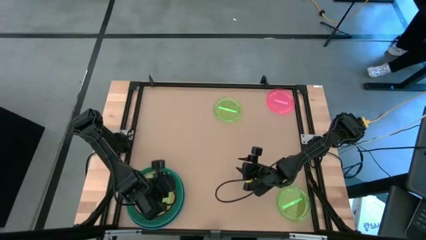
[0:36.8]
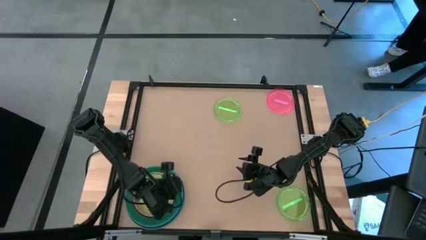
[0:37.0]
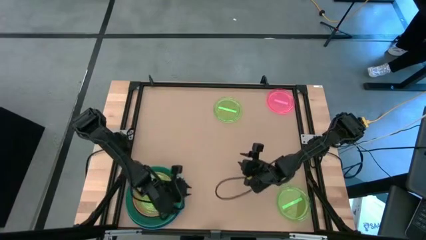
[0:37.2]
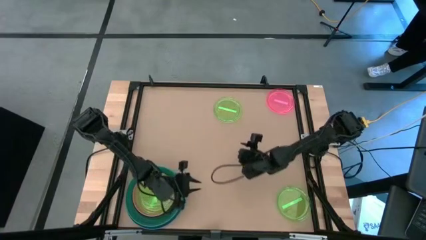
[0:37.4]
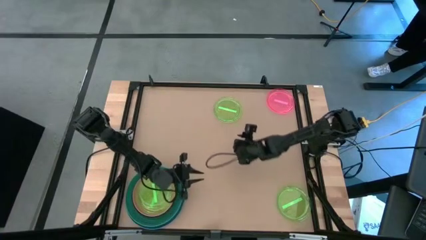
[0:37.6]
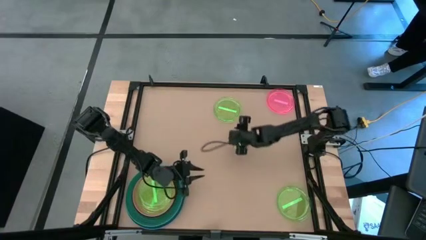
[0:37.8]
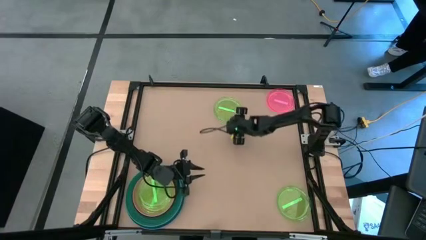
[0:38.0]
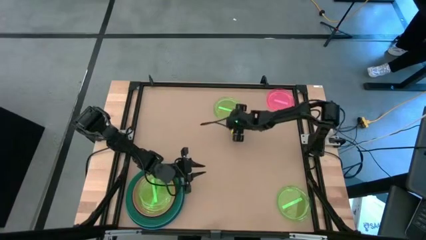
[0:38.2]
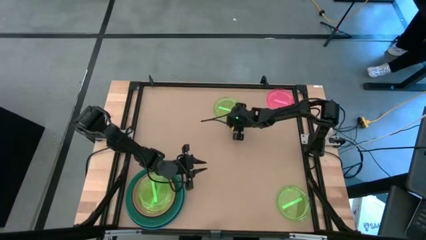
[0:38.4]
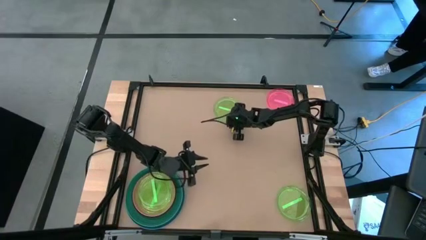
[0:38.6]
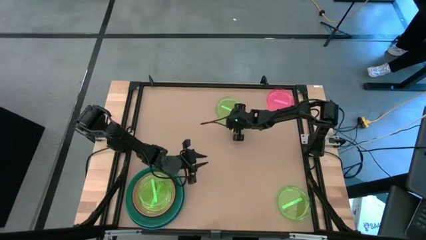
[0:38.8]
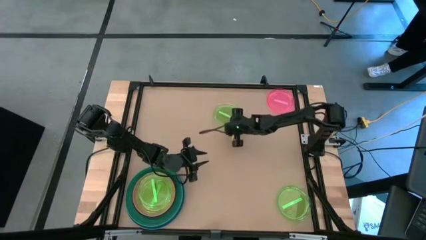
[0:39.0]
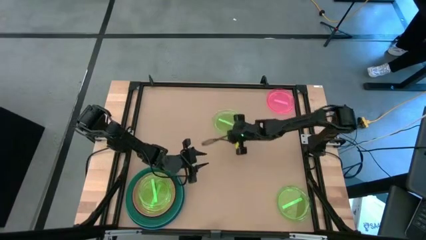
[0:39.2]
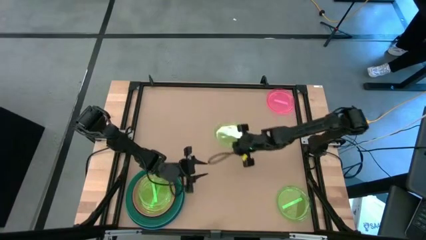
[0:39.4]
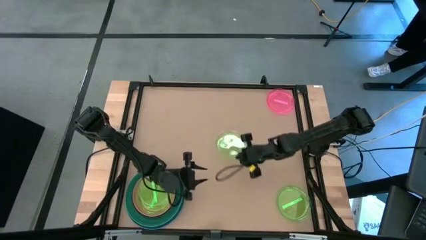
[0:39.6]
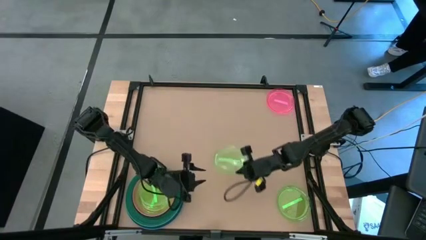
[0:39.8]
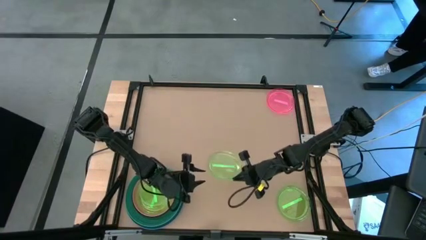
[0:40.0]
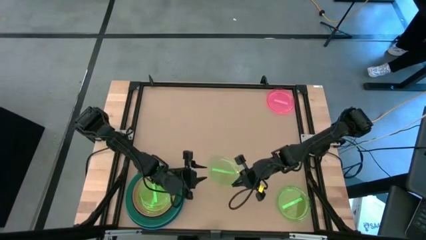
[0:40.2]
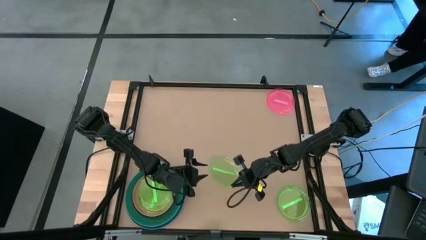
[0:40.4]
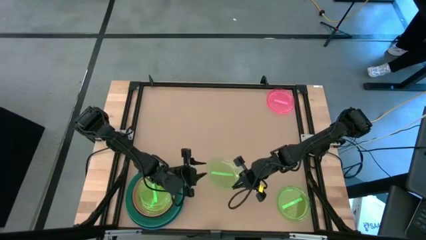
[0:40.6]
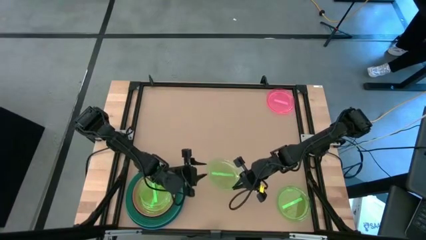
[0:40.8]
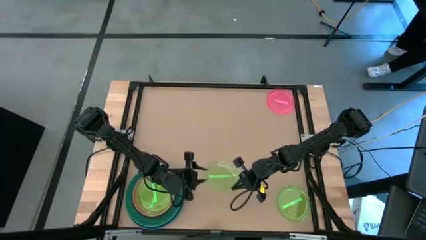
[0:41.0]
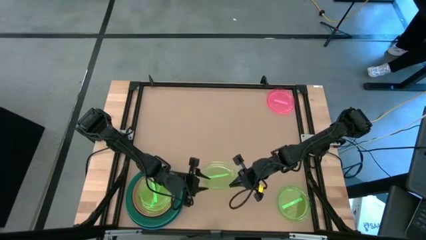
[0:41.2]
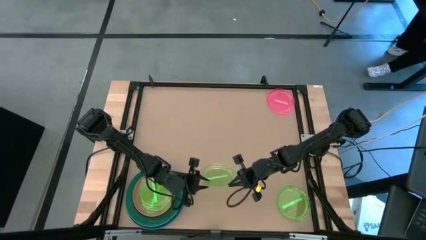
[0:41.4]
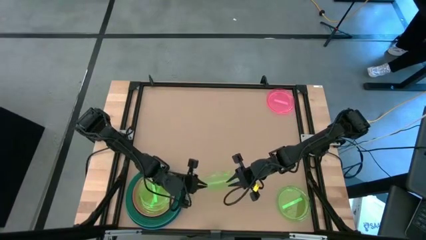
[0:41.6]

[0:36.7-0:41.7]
Task: Stack plastic plates
Stack the light green plate on top of the light green plate

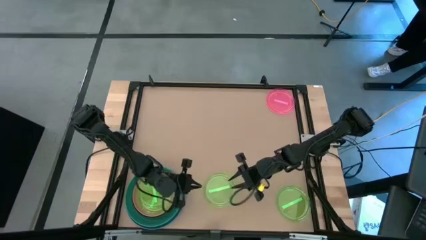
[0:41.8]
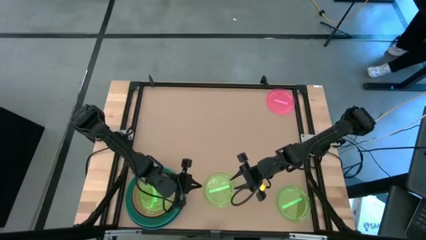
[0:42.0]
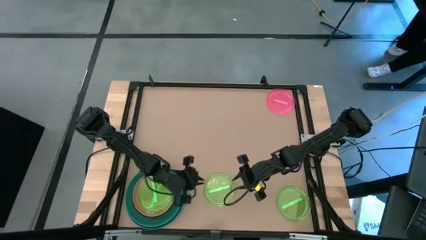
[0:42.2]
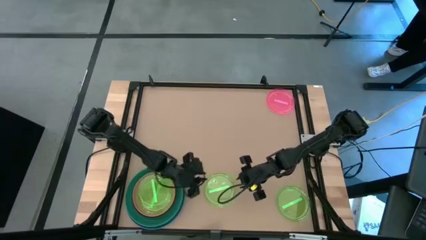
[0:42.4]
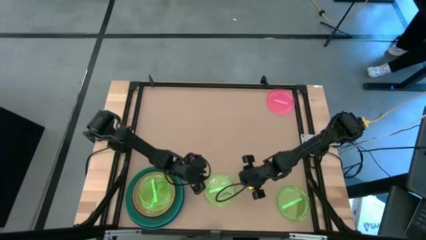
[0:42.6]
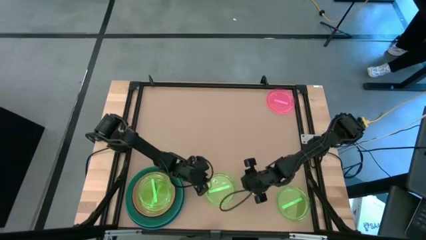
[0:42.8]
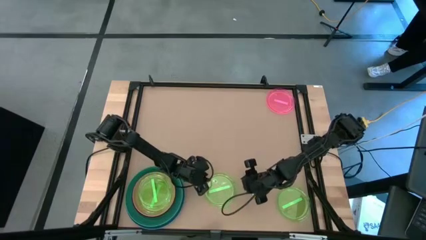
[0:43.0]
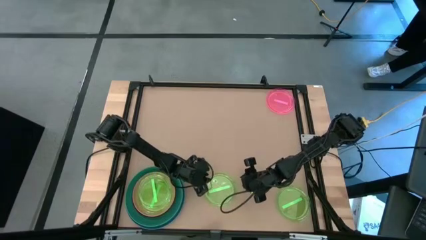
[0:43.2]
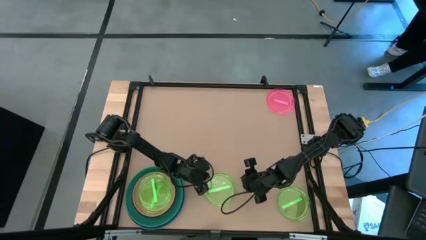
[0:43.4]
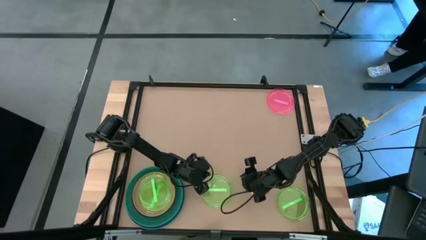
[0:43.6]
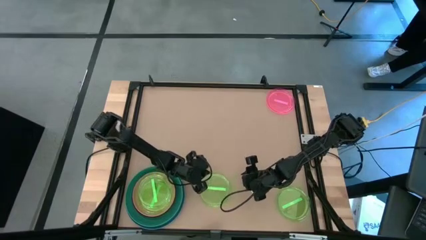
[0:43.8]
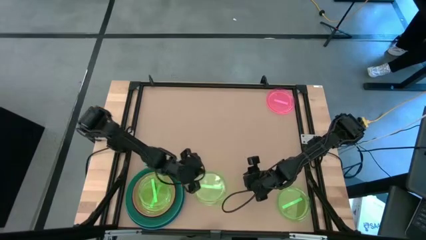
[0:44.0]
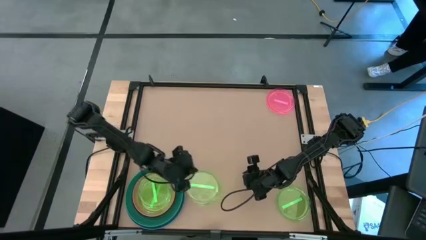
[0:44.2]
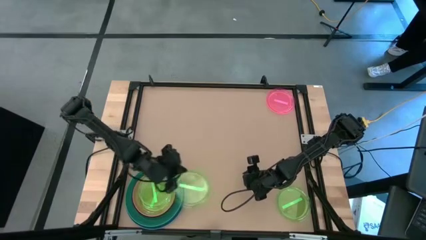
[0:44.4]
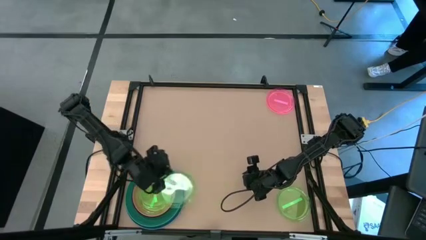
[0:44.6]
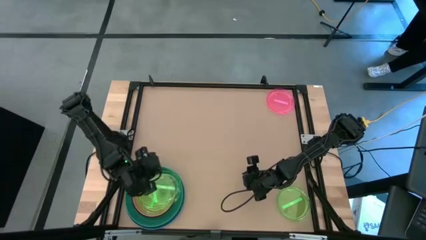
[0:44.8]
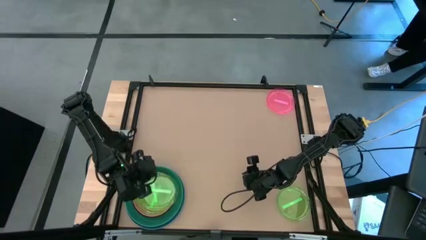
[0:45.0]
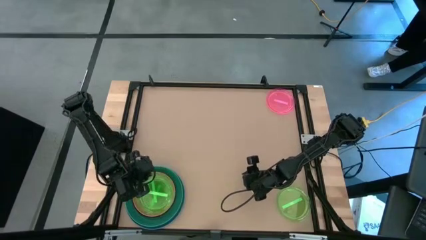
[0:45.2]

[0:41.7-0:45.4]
Stack the light green plate on top of the light green plate

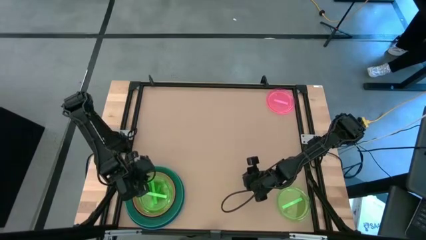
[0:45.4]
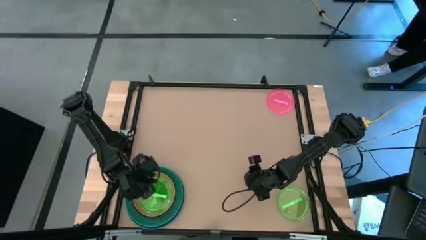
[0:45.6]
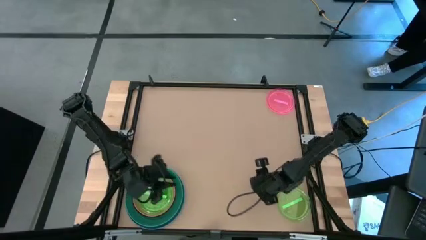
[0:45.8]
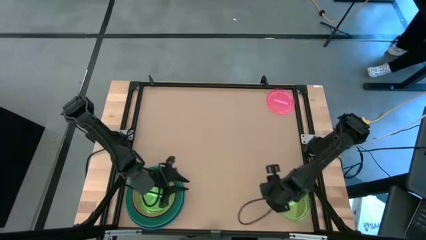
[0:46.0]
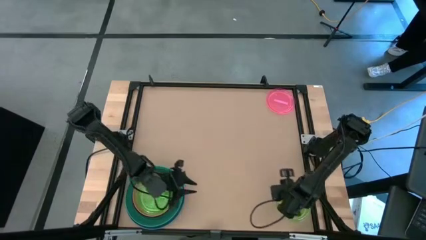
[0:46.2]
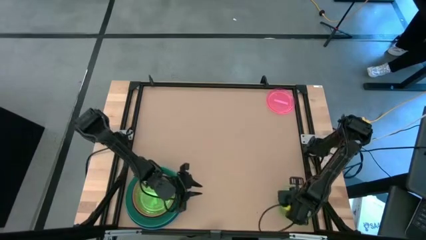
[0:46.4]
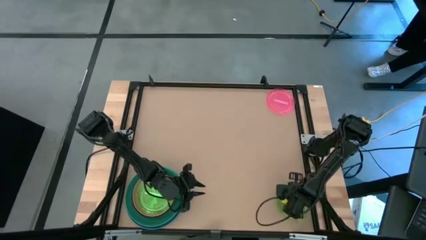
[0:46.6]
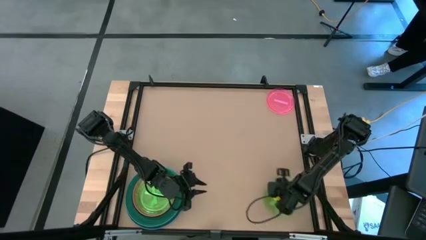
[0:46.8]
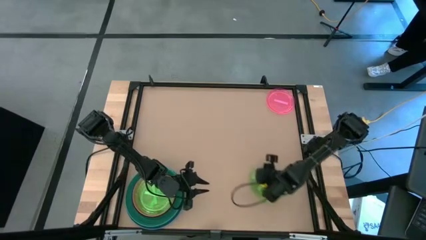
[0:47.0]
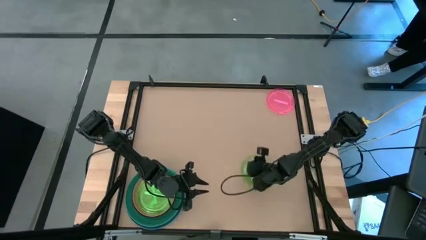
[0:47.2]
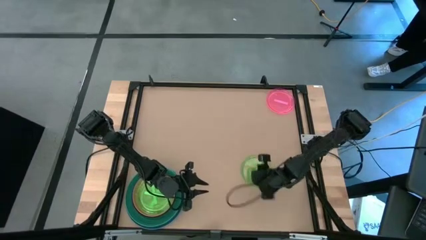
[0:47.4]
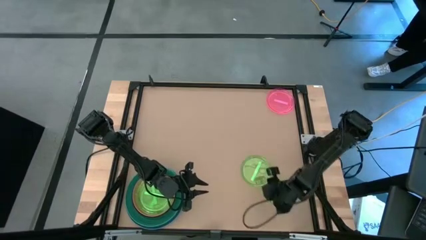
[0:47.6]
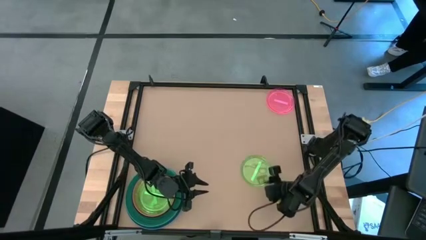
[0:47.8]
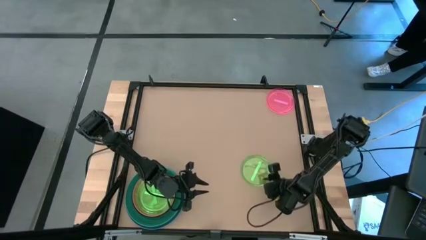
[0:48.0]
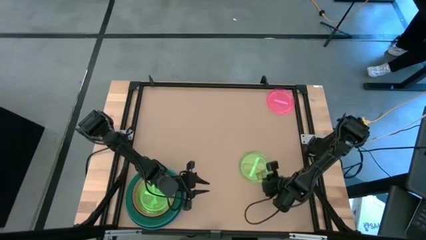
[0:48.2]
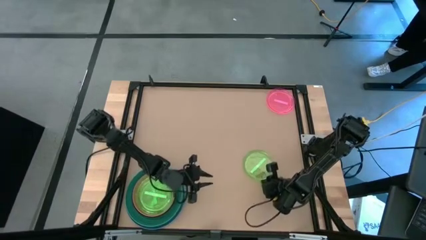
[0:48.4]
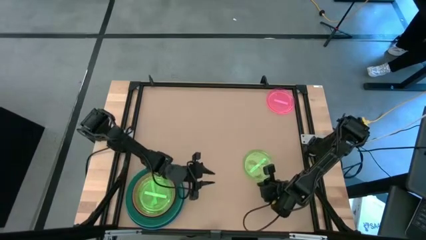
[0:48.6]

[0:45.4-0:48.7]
Stack the light green plate on top of the light green plate

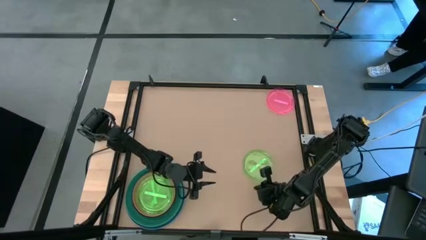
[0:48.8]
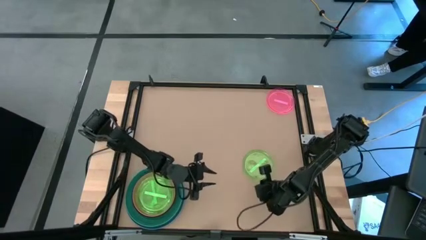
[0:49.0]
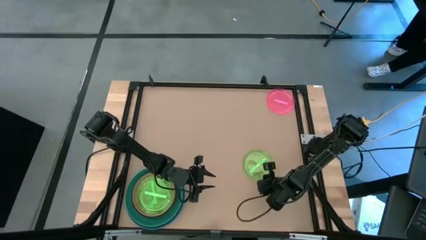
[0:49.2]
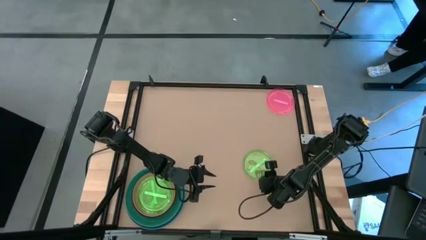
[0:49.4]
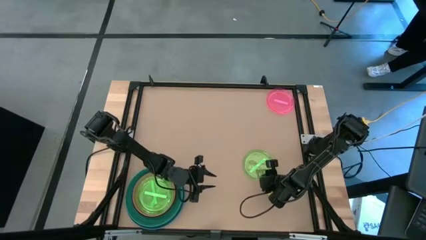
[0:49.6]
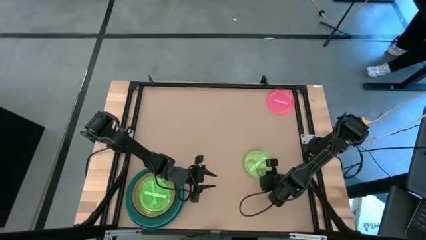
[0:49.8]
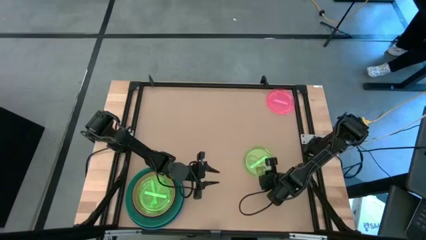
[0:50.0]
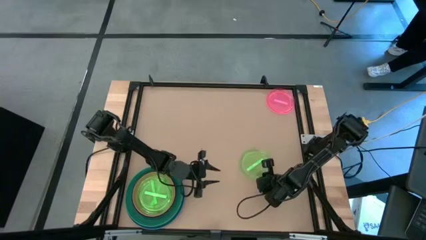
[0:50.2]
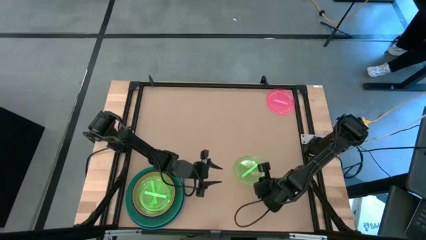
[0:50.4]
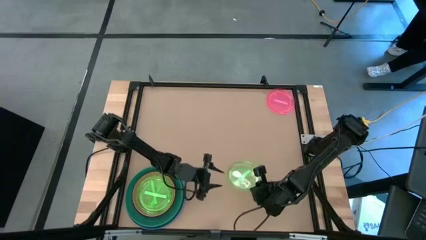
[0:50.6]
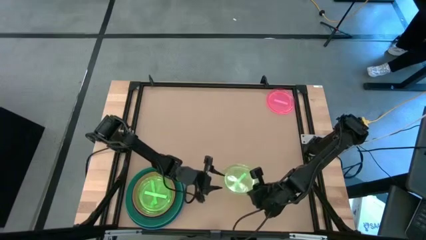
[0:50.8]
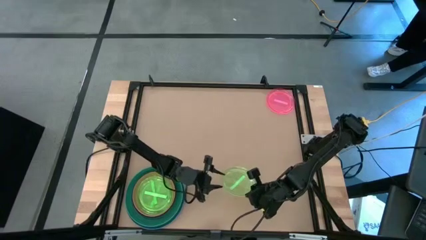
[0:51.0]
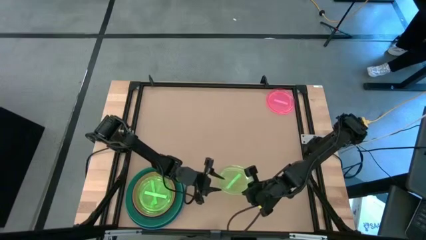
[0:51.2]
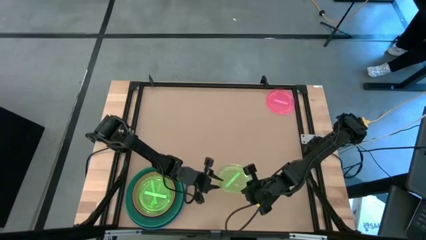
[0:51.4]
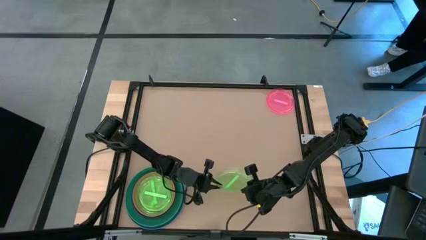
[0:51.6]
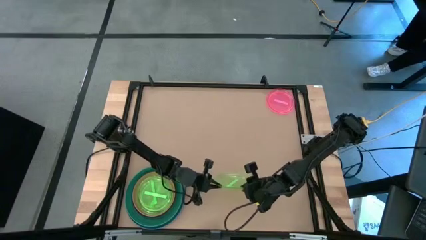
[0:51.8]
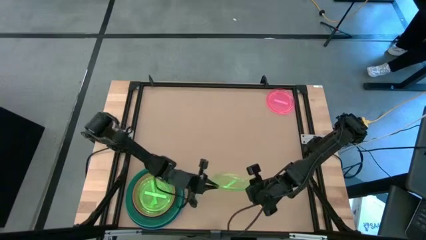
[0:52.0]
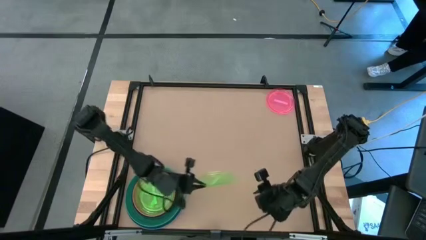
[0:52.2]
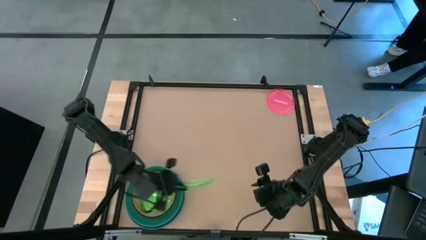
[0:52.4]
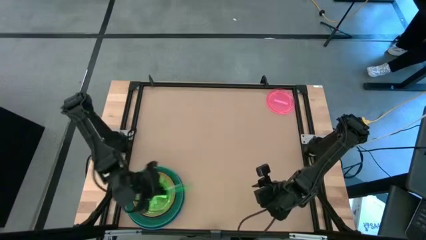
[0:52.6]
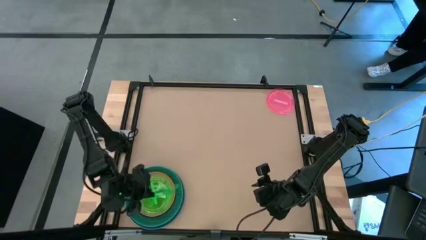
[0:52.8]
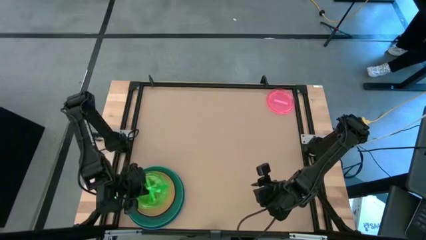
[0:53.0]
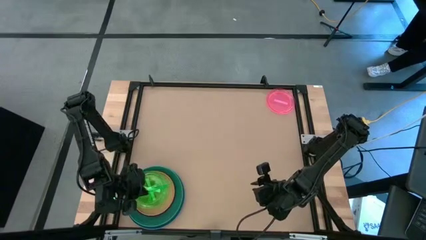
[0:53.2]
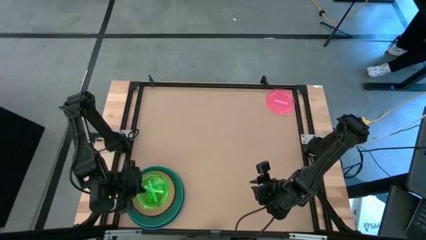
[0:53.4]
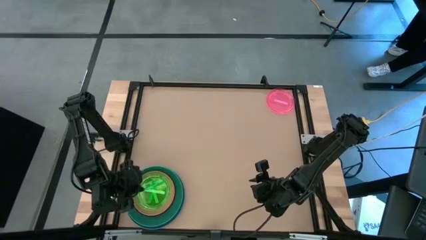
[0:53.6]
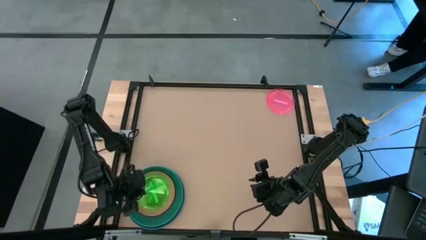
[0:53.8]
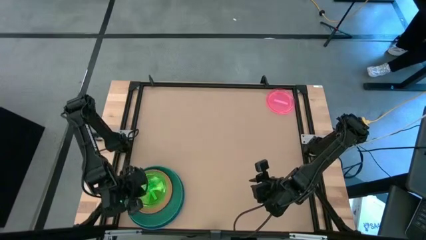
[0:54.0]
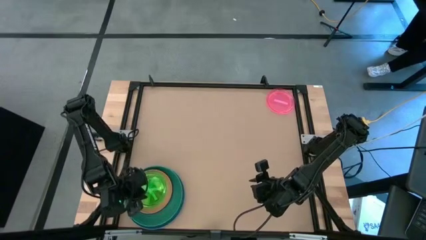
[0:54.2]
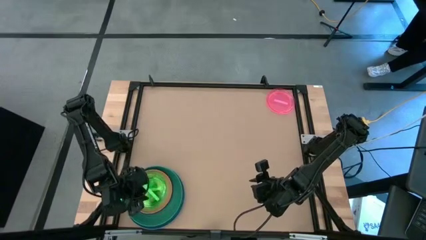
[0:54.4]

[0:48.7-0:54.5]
Stack the light green plate on top of the light green plate
